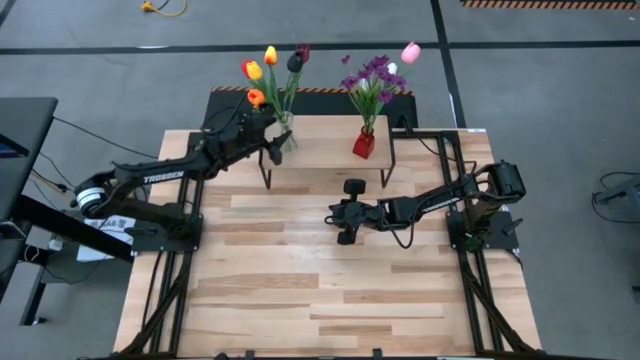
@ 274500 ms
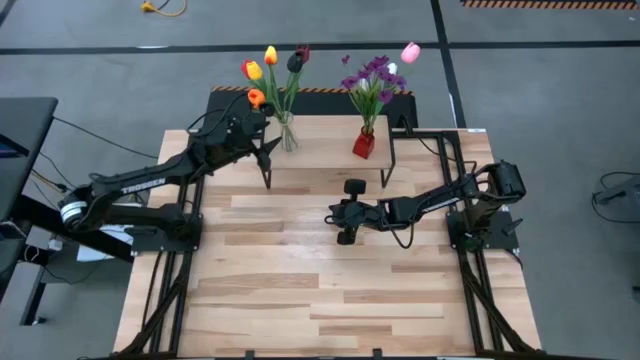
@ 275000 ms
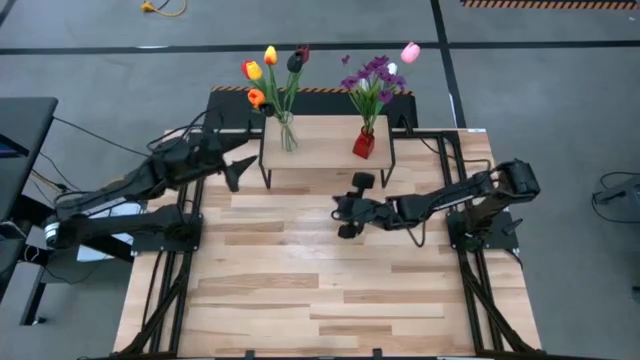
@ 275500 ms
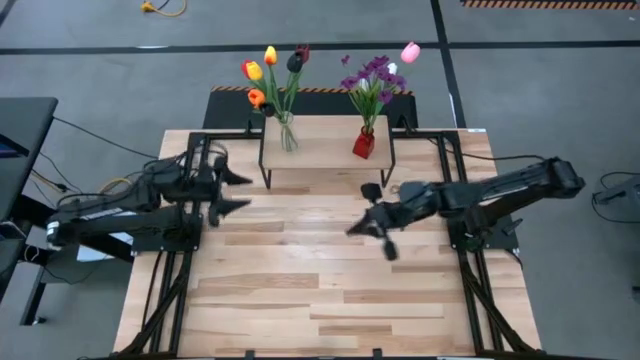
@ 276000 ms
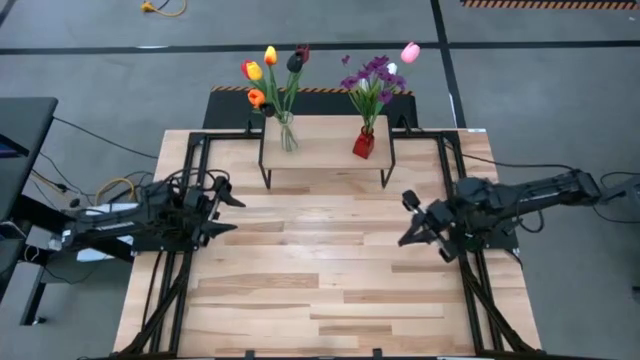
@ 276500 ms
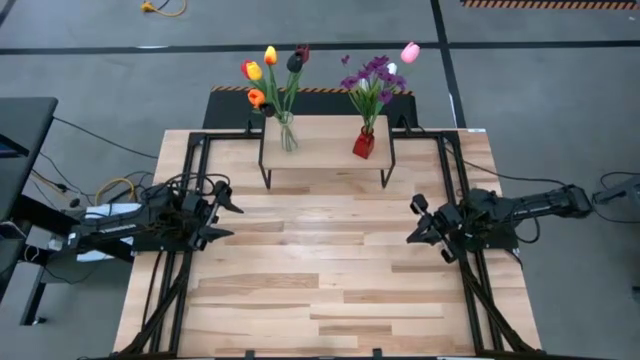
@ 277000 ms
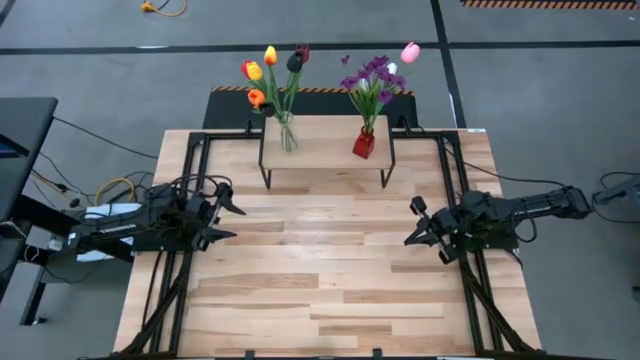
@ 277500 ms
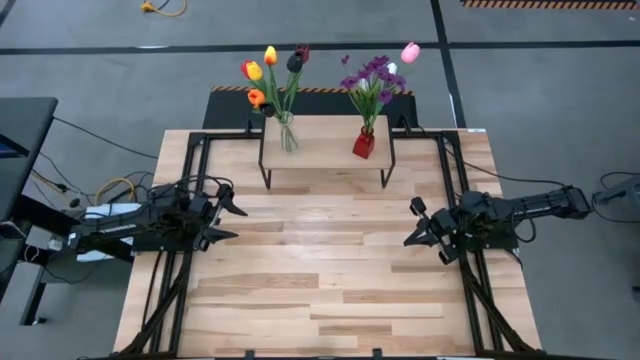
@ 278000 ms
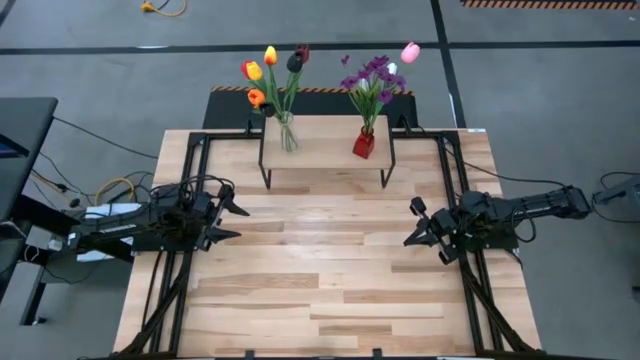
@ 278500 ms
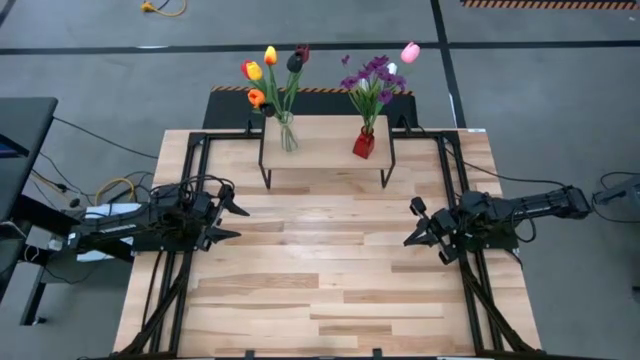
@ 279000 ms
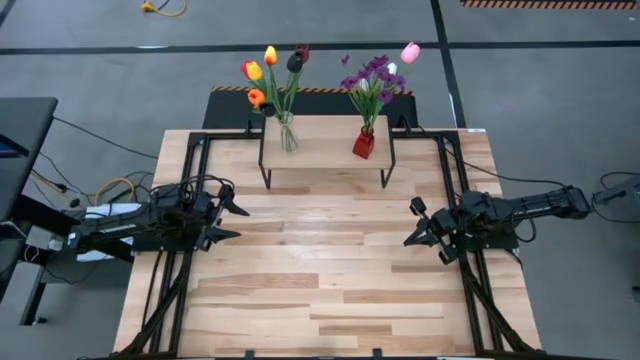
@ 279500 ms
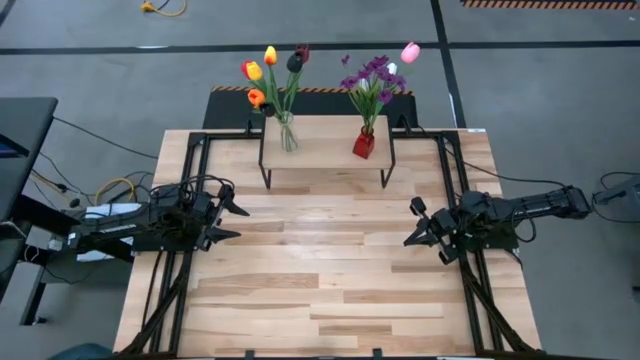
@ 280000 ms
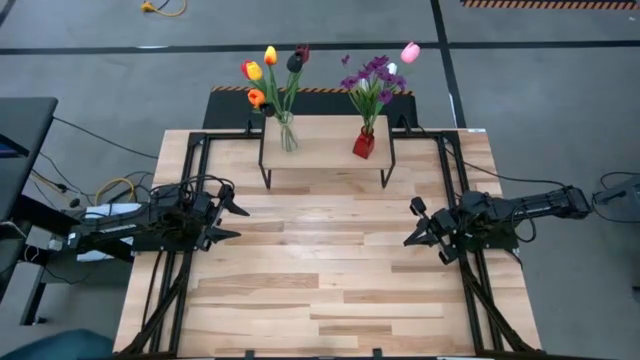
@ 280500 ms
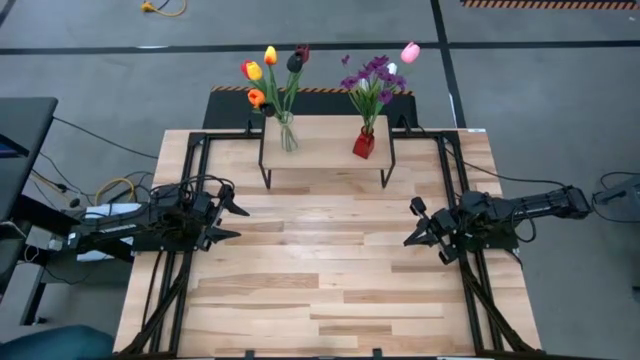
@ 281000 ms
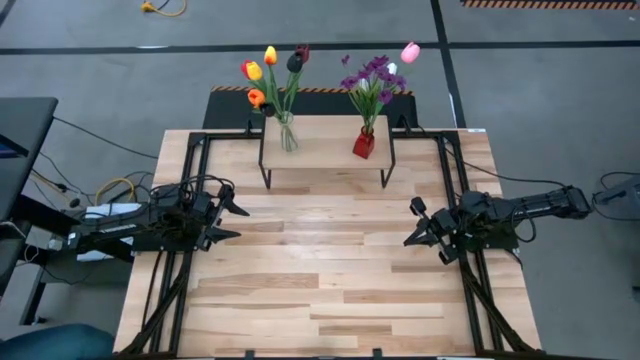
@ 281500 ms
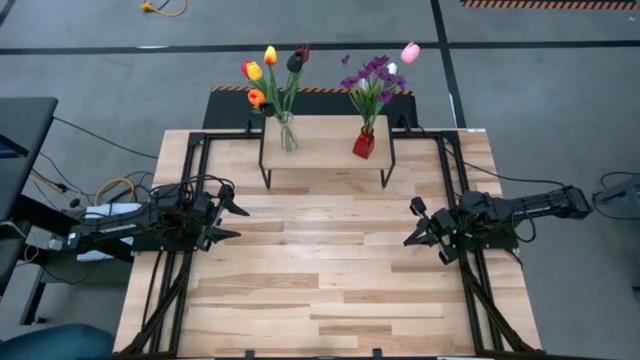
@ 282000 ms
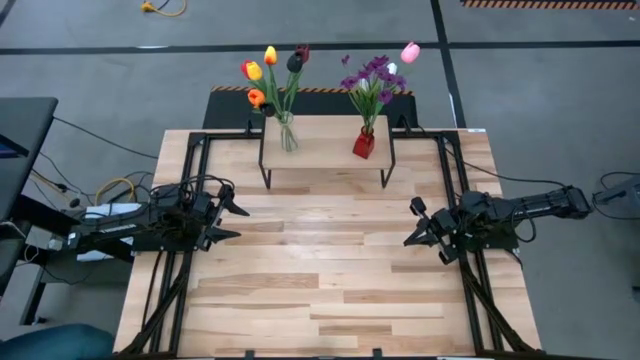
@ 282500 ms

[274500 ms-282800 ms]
Task: Pick and place flowers into a vace then onto a shelf
Return to Home Position

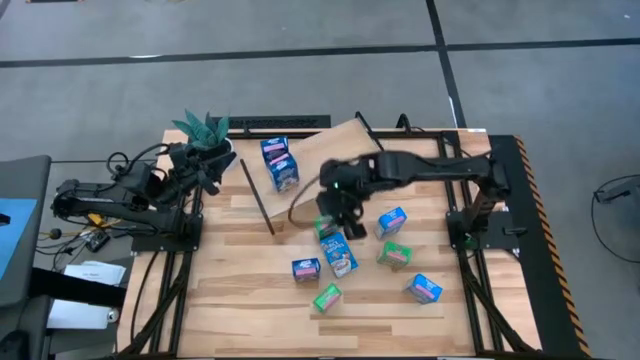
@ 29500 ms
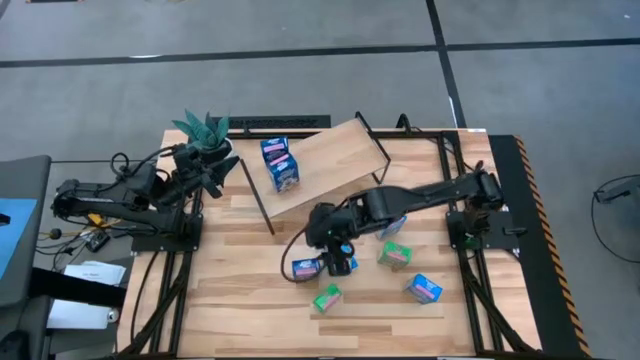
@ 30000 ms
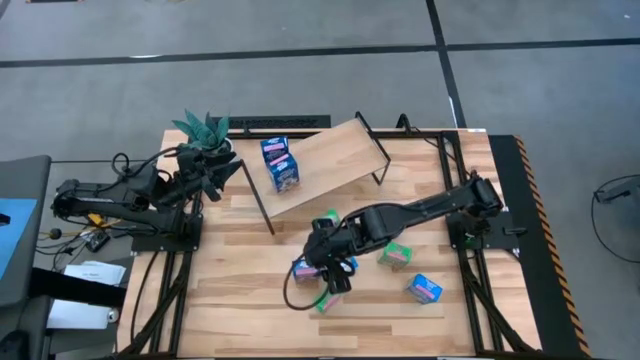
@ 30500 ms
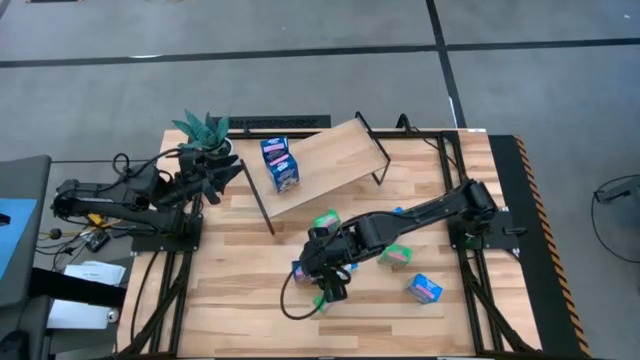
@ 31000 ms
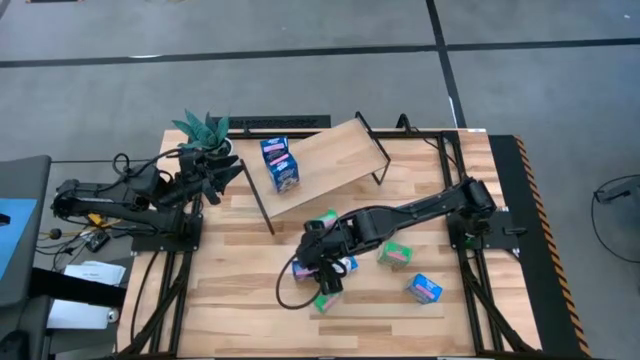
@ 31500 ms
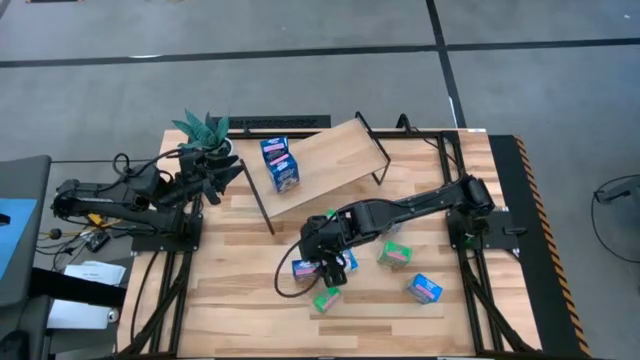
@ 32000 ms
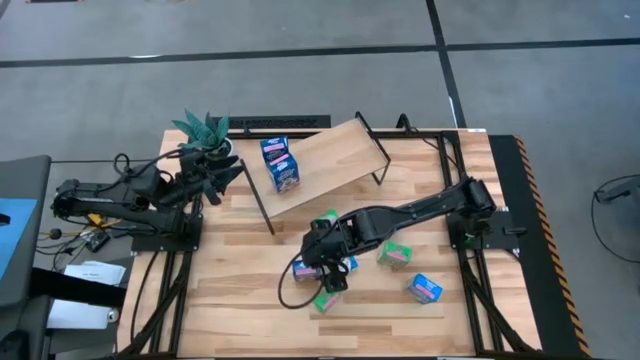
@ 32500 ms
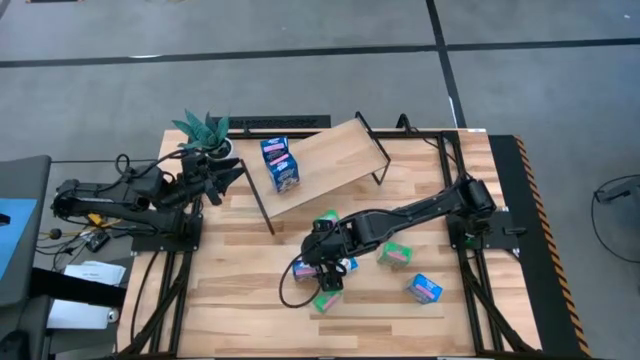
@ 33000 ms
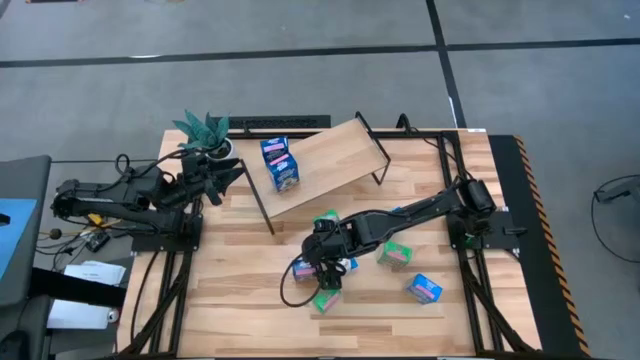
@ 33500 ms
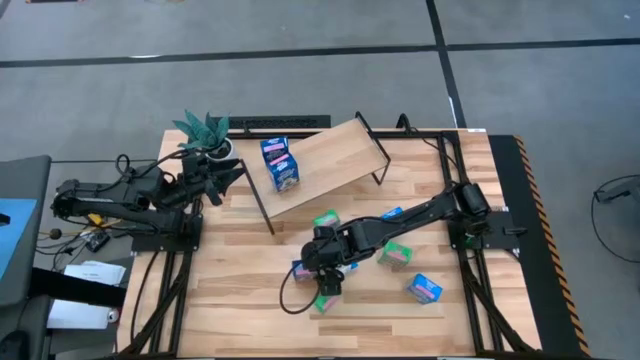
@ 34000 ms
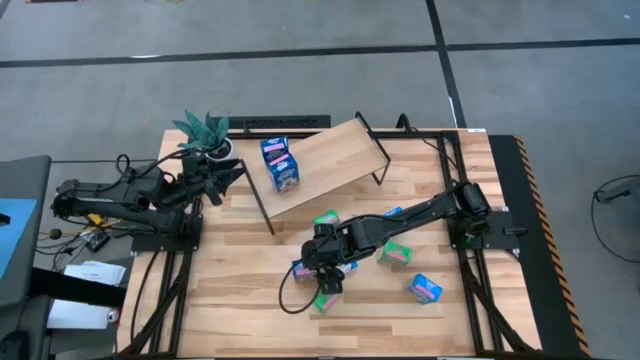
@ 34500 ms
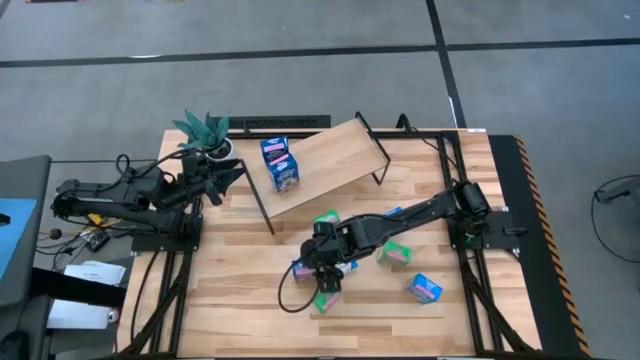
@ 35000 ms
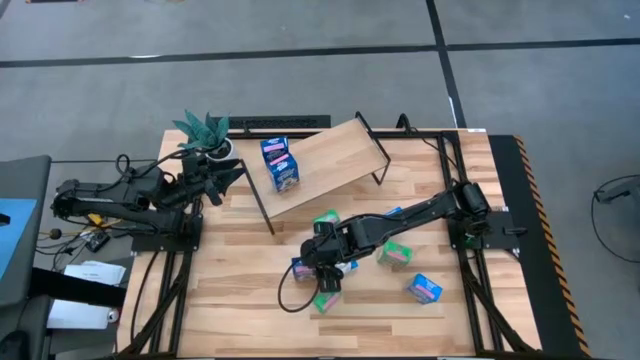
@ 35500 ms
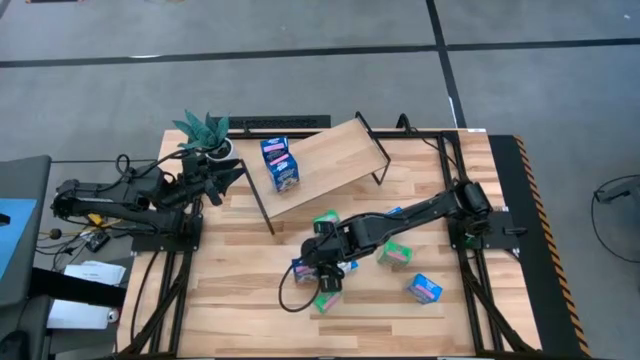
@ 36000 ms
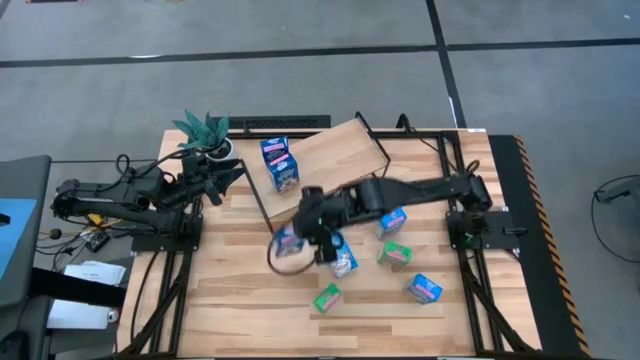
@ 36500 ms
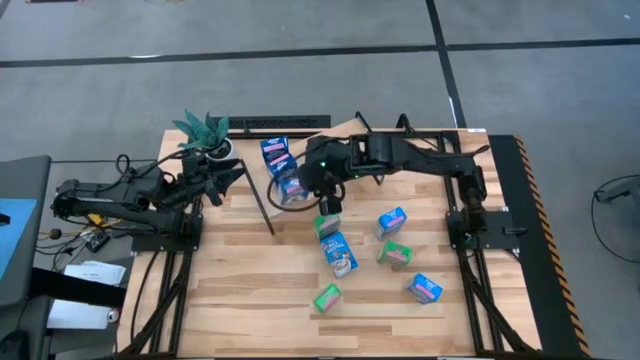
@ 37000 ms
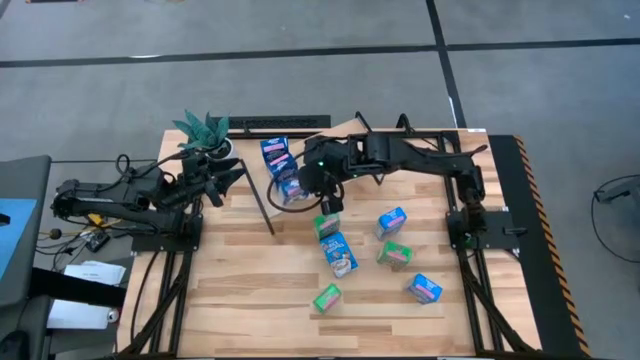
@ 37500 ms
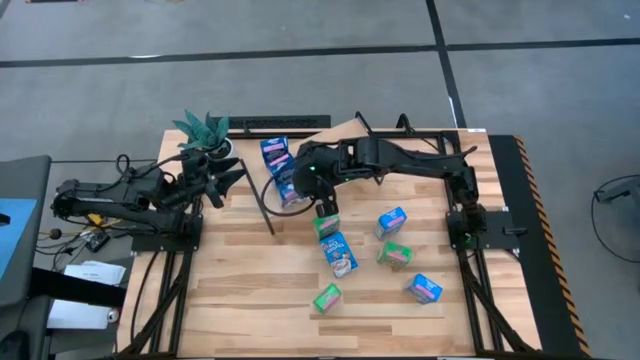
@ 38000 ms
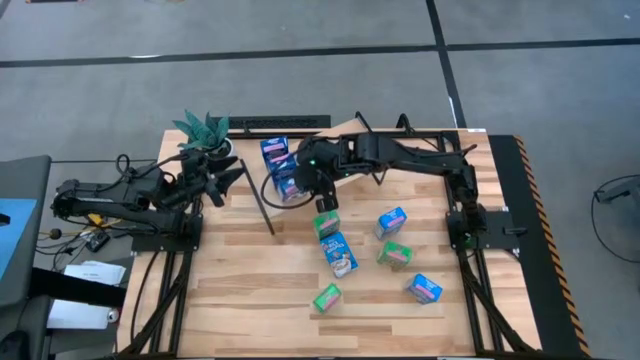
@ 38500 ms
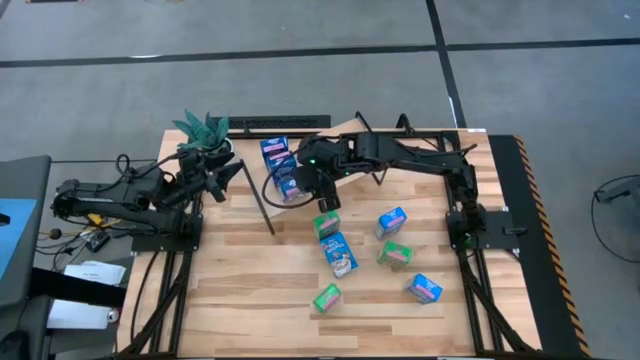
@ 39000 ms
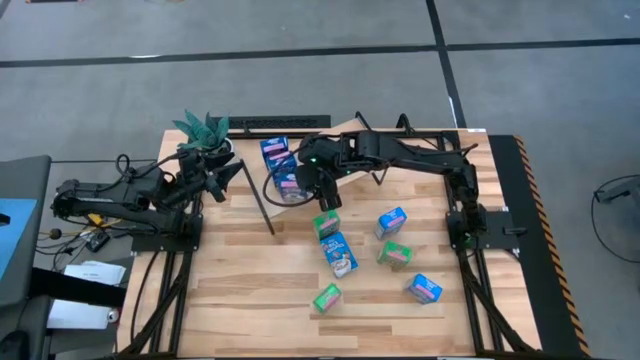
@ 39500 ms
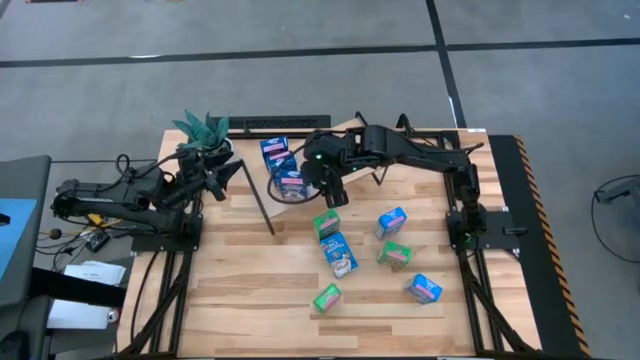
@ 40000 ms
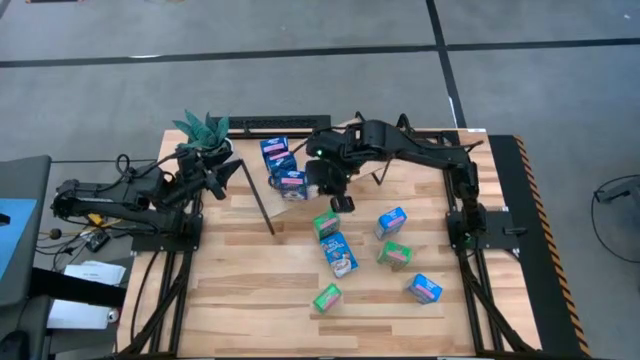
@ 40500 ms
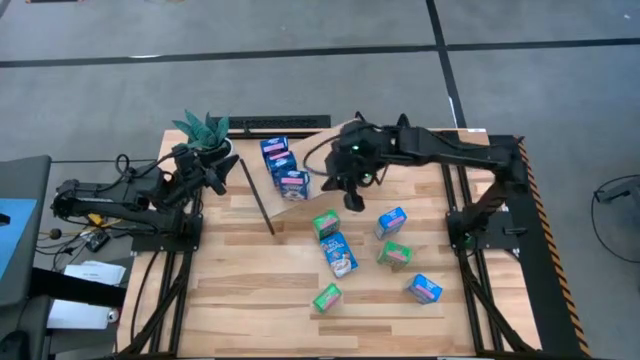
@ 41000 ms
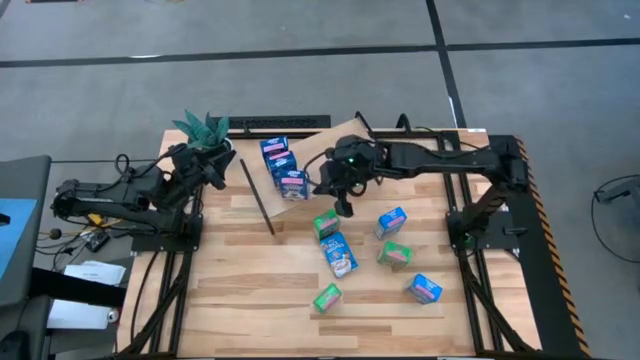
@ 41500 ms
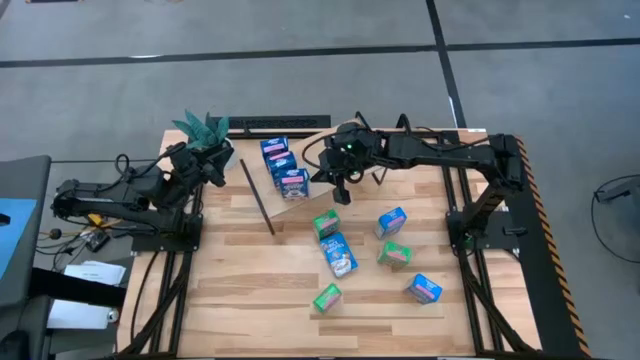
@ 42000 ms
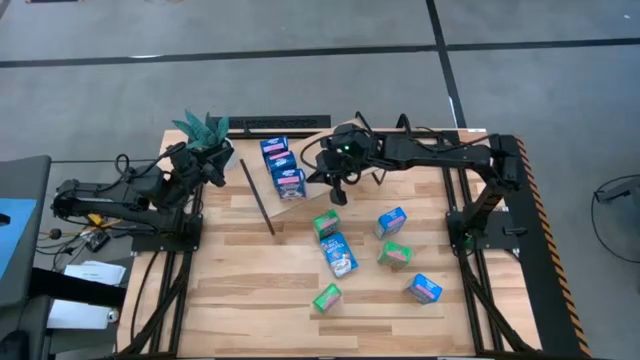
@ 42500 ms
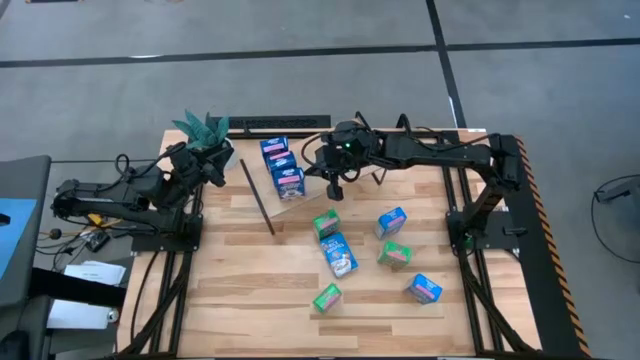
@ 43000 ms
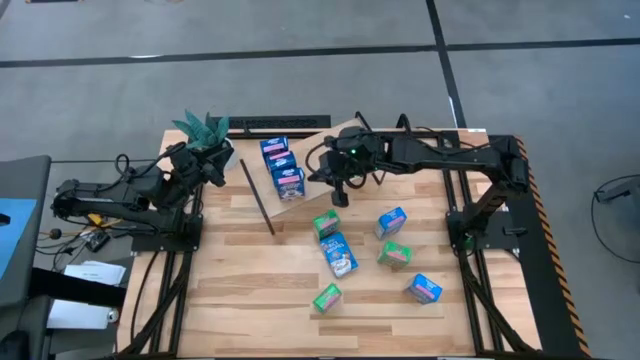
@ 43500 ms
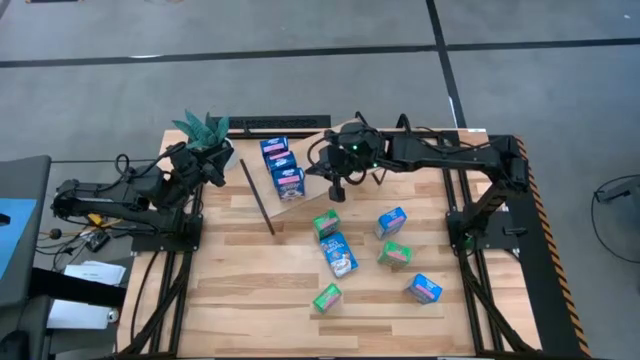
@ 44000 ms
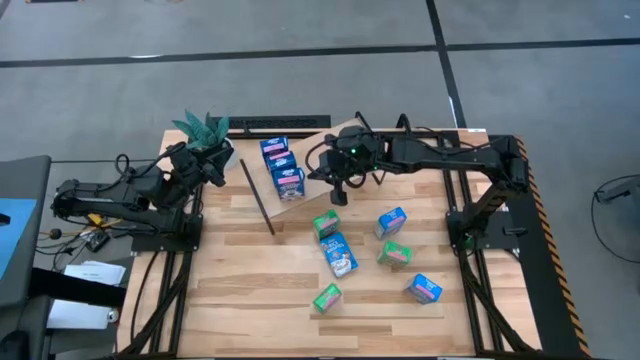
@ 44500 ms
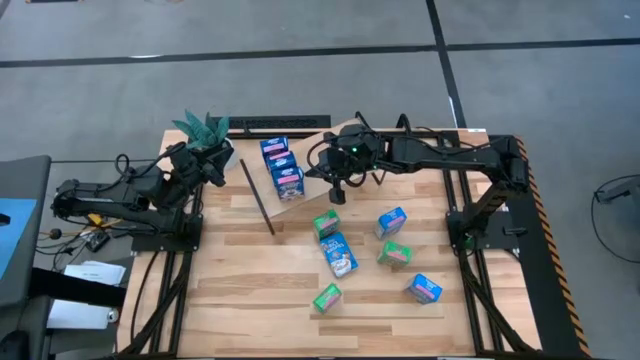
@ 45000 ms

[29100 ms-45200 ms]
Task: Stack cereal on shelf
Put the blue cereal box on the shelf and align it with the other blue cereal boxes
